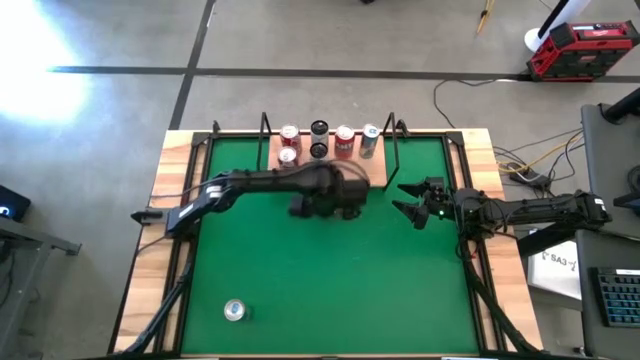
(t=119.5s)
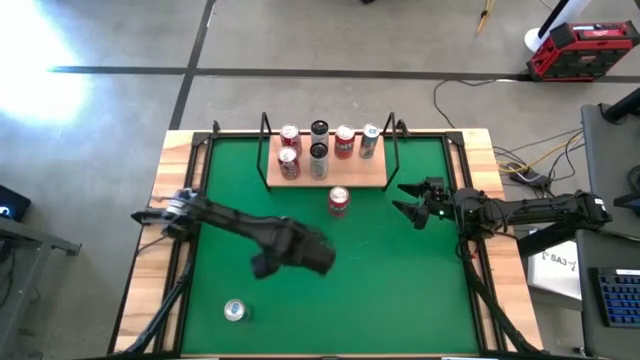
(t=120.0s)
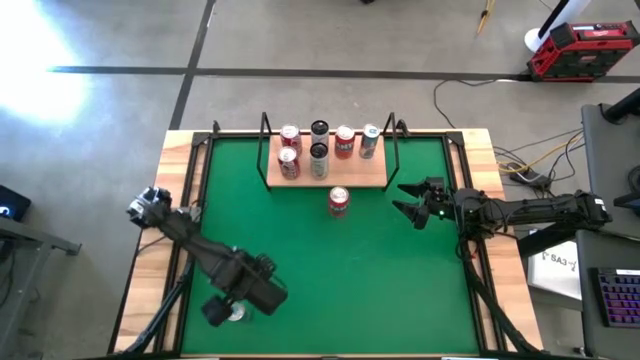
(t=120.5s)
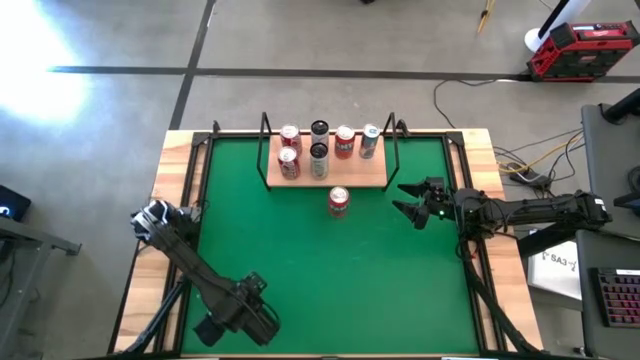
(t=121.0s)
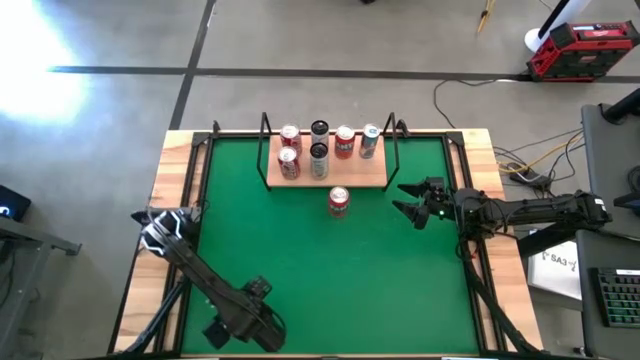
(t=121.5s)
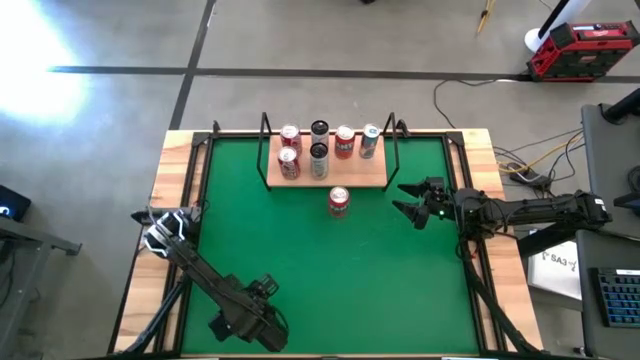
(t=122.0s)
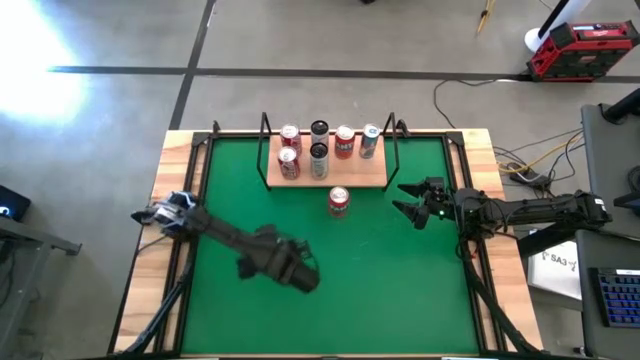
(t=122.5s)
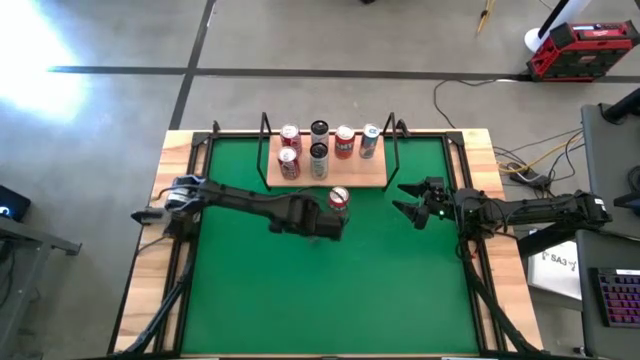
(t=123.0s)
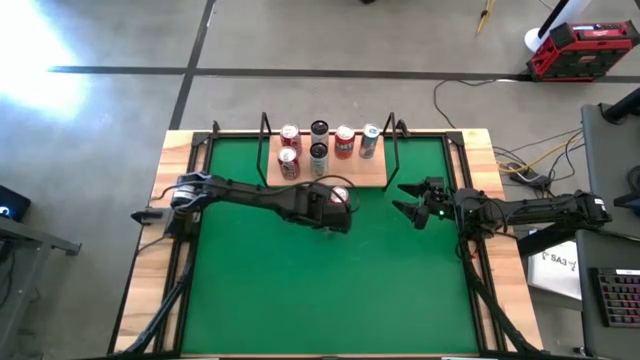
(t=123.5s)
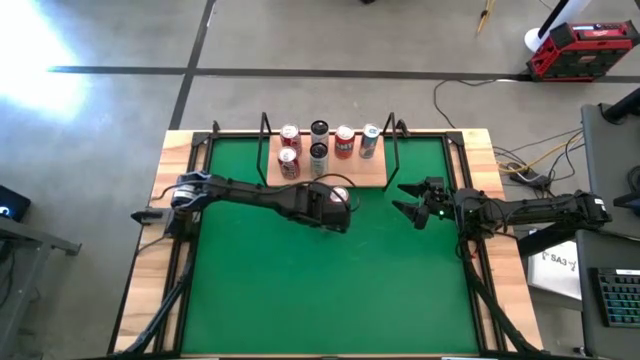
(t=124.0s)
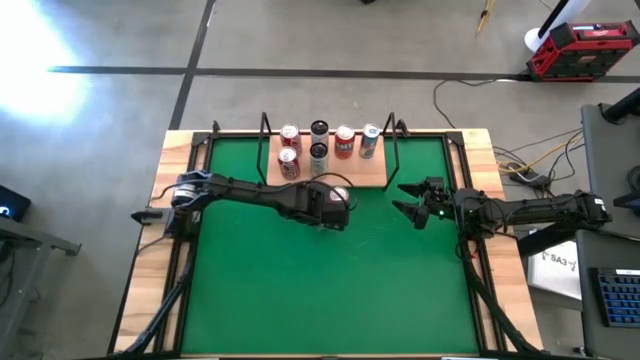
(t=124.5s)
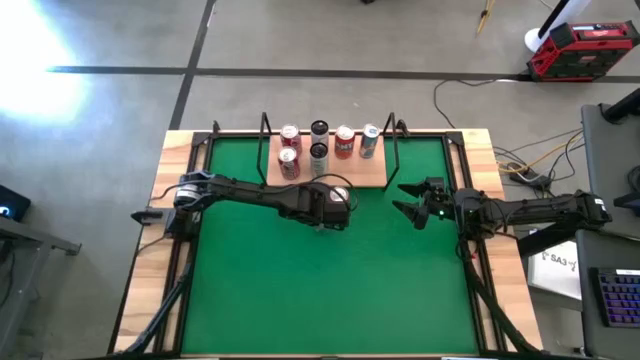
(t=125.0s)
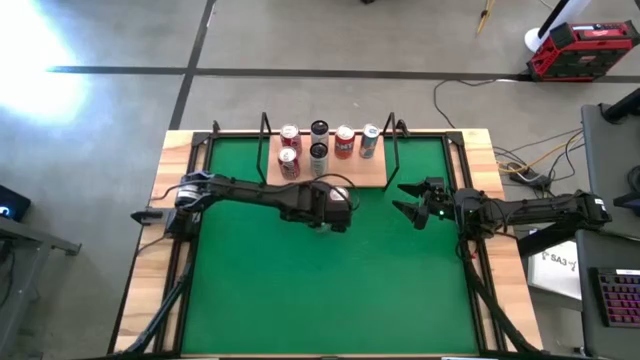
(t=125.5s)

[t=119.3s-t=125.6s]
Task: Place canned beverage on shelf
Move the blue soda can to the center of the table

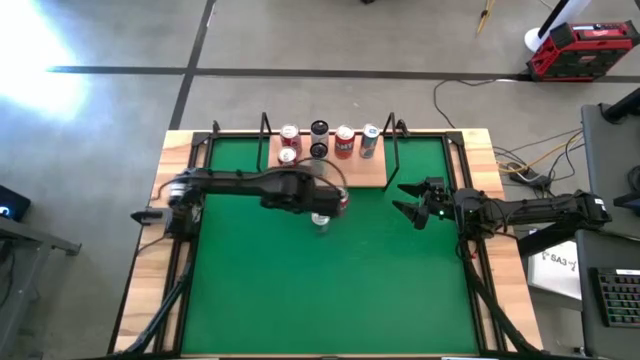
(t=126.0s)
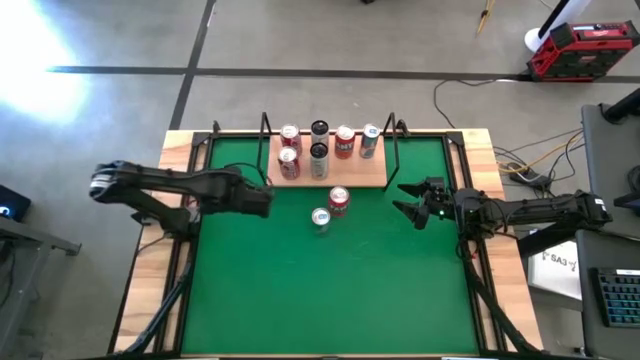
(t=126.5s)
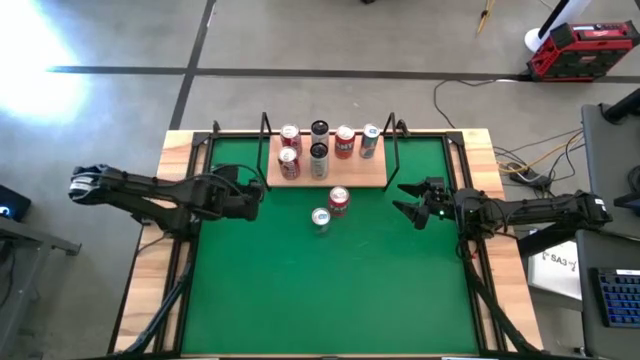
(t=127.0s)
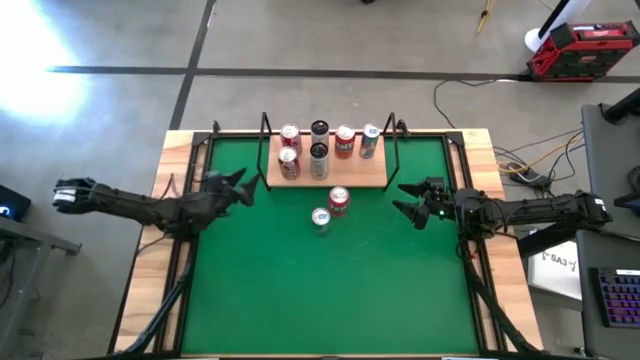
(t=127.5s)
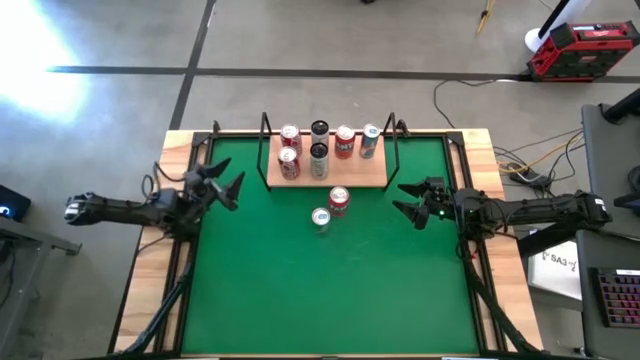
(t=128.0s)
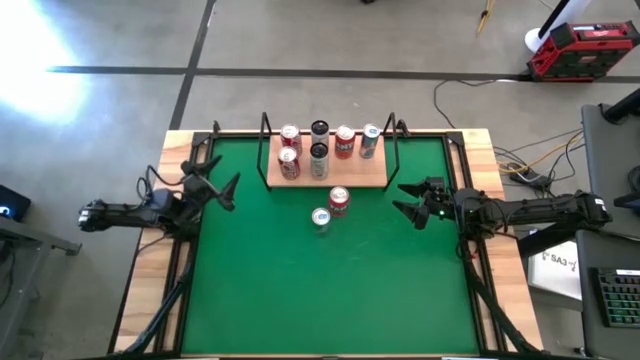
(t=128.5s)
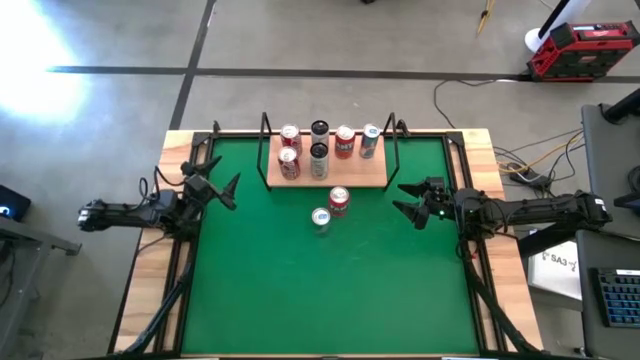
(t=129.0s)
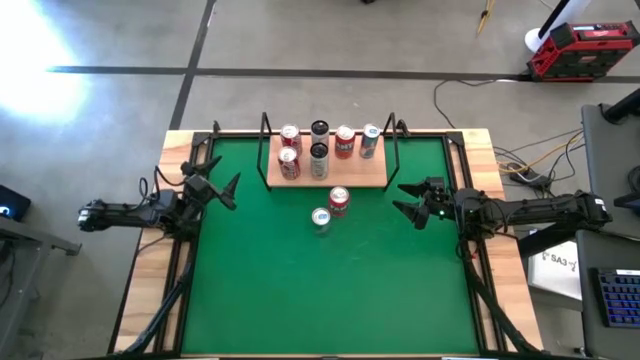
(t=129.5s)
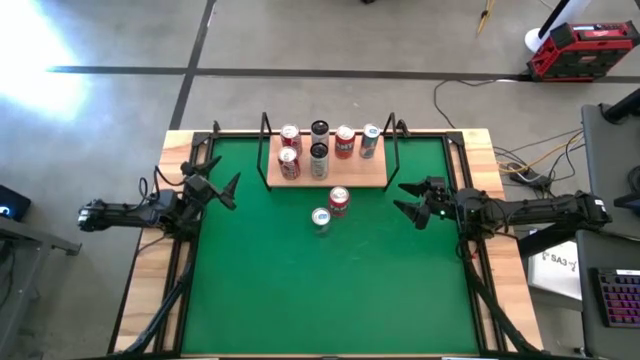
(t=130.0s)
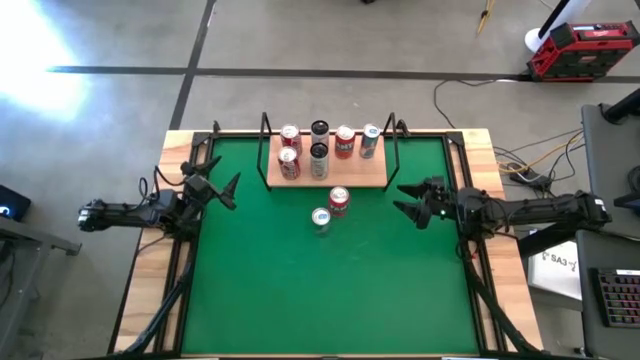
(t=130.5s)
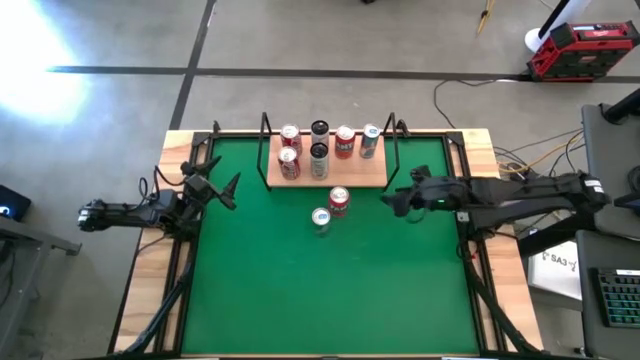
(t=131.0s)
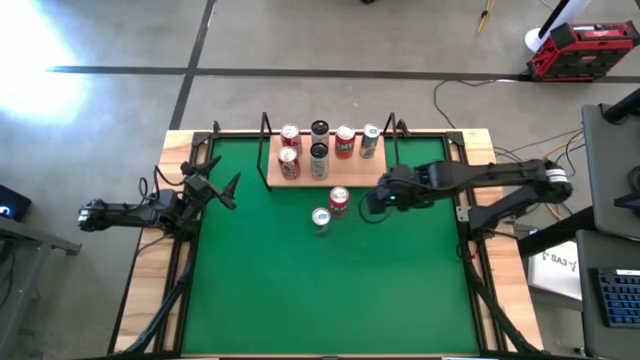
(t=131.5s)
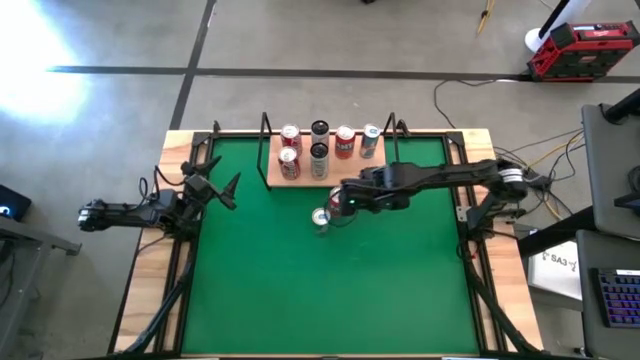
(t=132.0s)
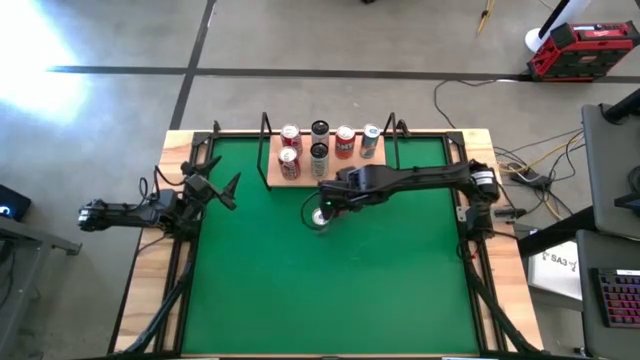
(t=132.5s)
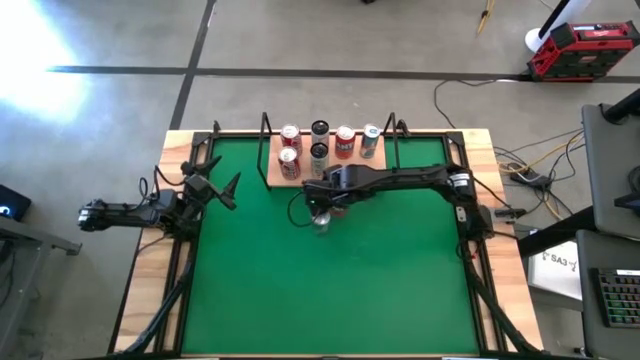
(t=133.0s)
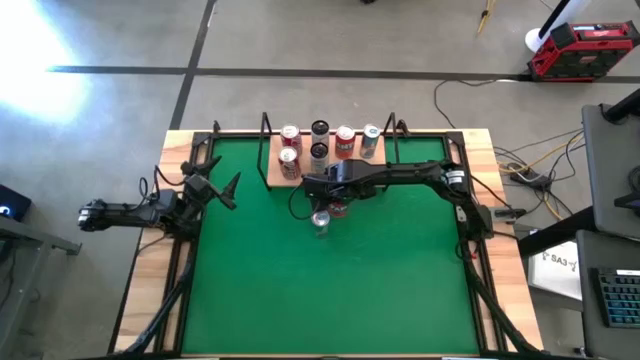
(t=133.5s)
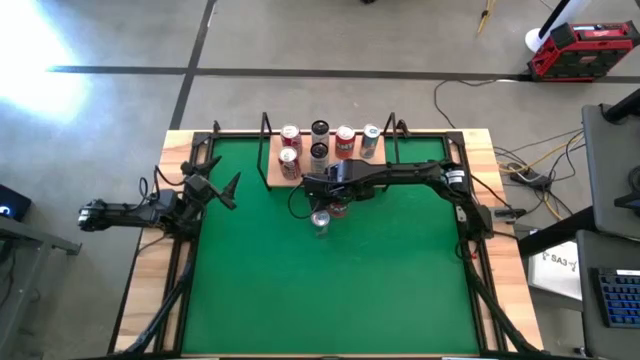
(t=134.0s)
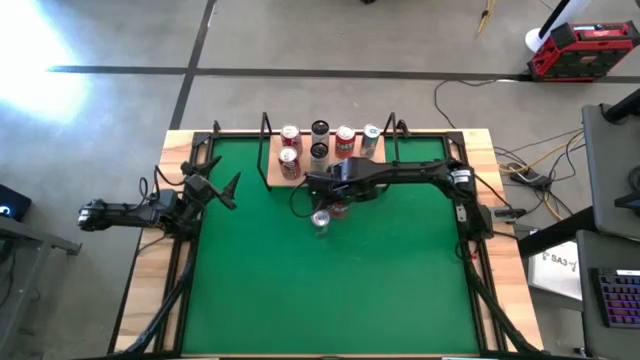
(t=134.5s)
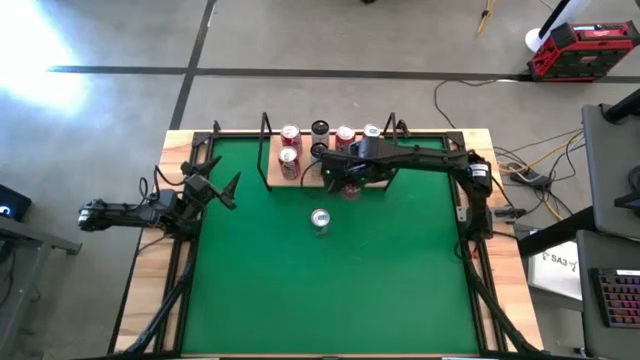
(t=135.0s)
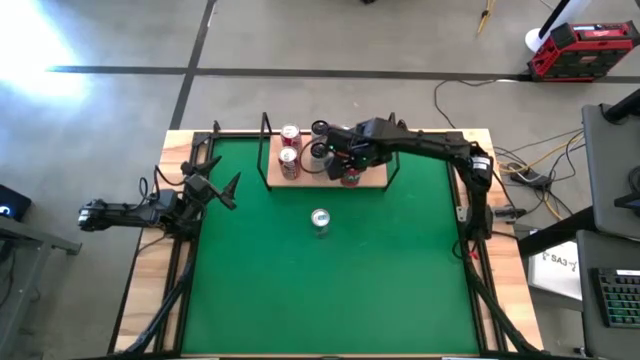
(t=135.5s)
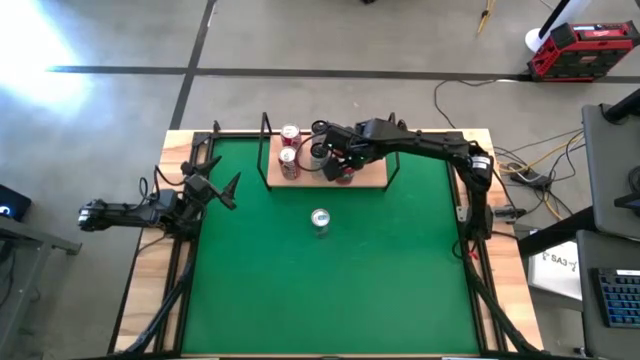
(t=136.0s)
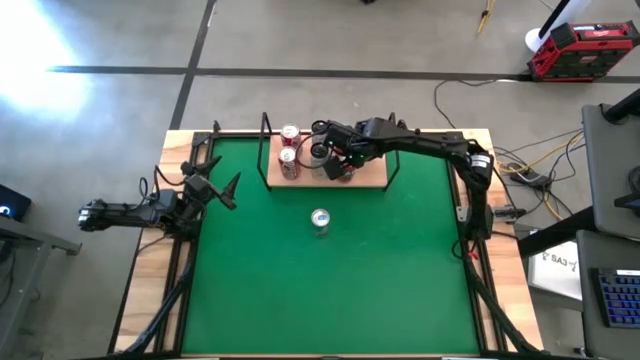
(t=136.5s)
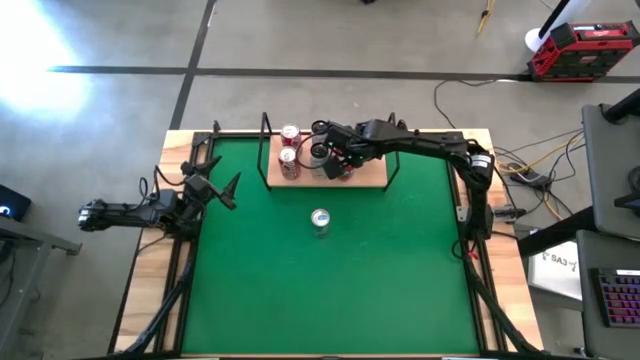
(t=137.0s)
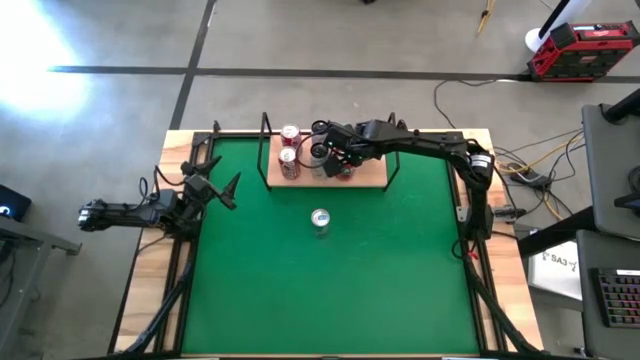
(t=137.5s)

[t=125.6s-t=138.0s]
Put the red soda can on the shelf aligned with the other red soda can
